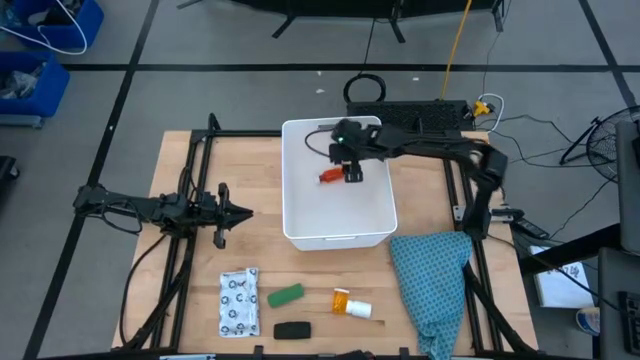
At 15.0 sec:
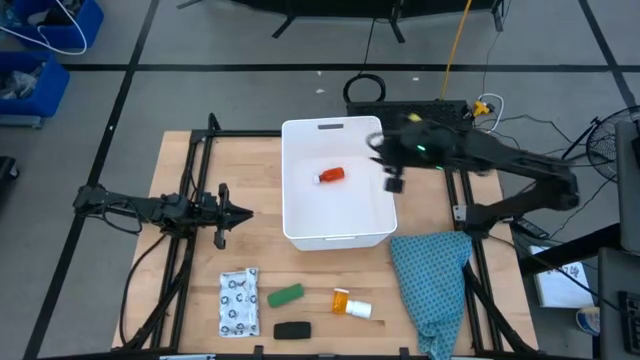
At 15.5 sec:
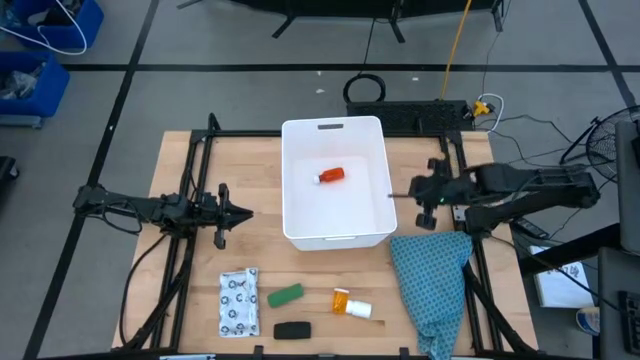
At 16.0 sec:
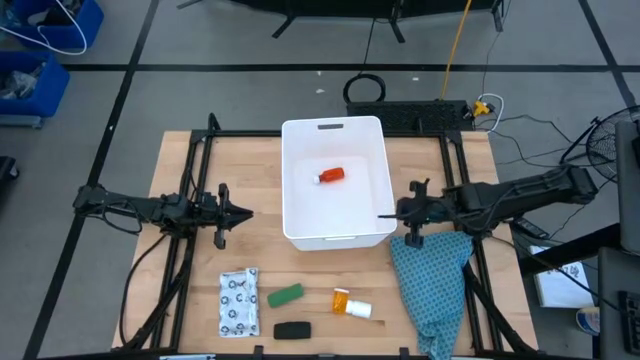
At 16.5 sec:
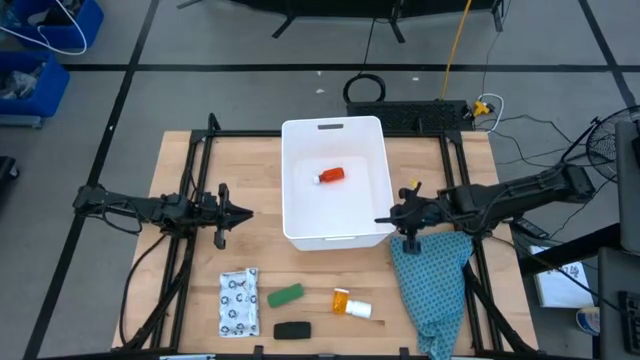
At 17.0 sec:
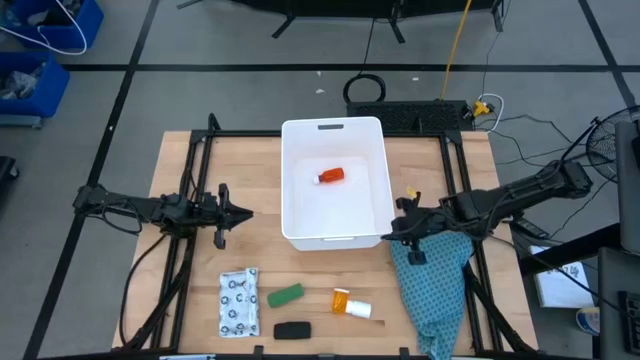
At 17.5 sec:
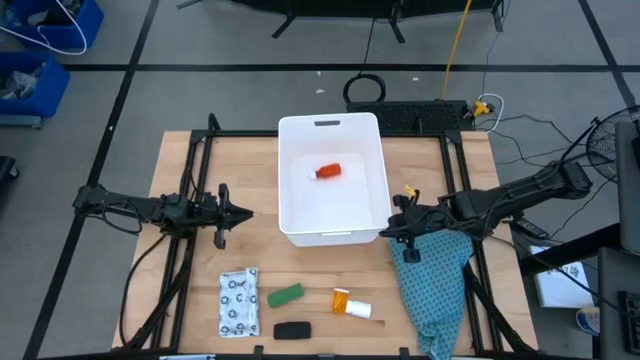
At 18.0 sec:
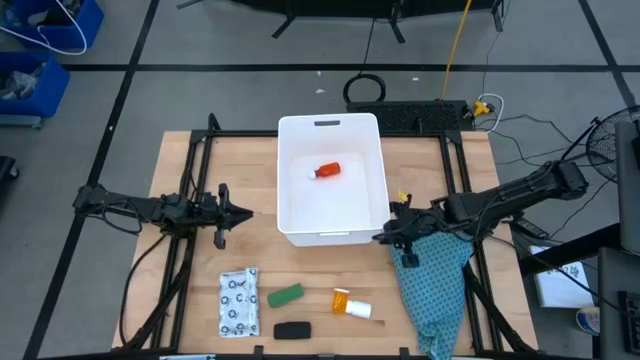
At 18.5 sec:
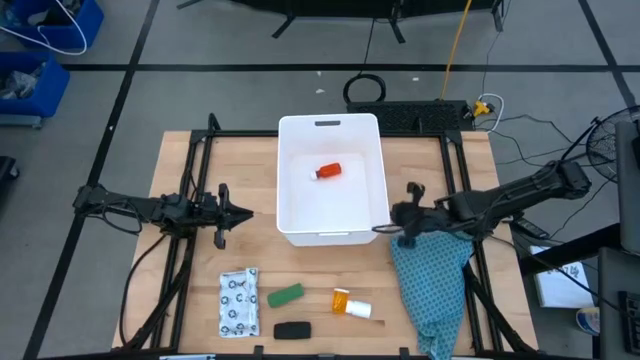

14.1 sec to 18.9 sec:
Task: Pick & place medical supplies in basket/bin
Adjust the basket

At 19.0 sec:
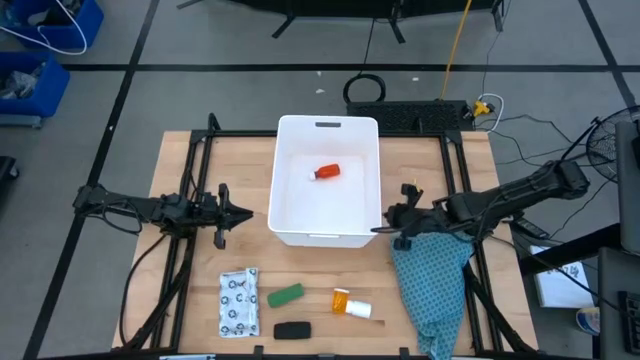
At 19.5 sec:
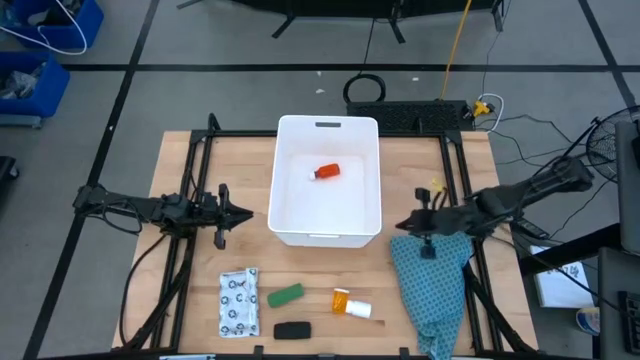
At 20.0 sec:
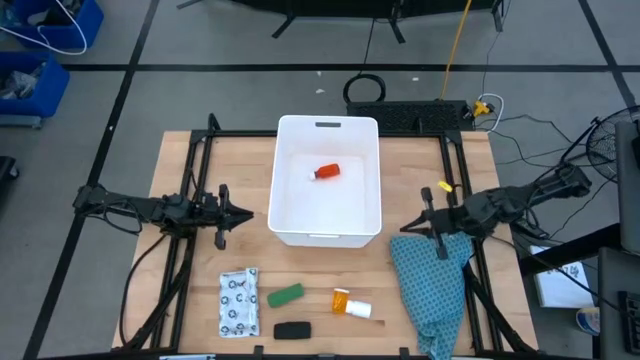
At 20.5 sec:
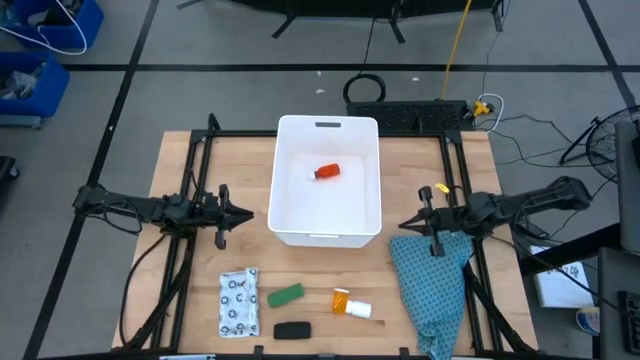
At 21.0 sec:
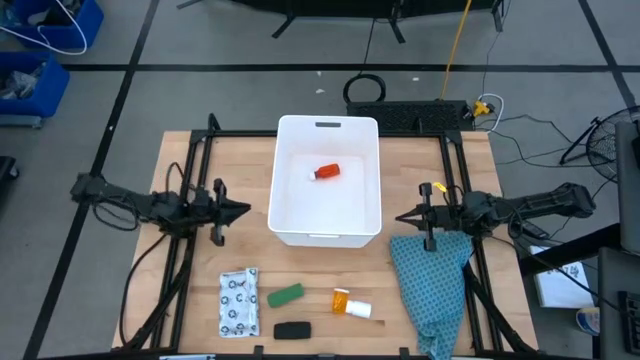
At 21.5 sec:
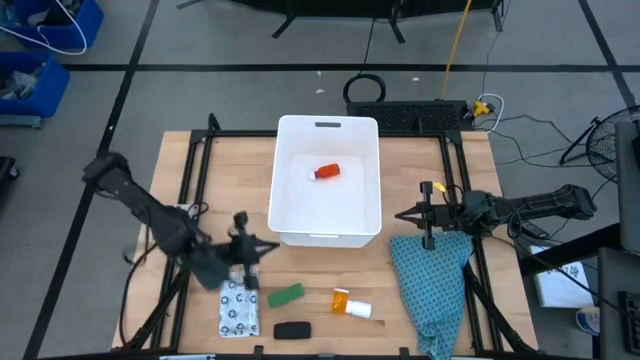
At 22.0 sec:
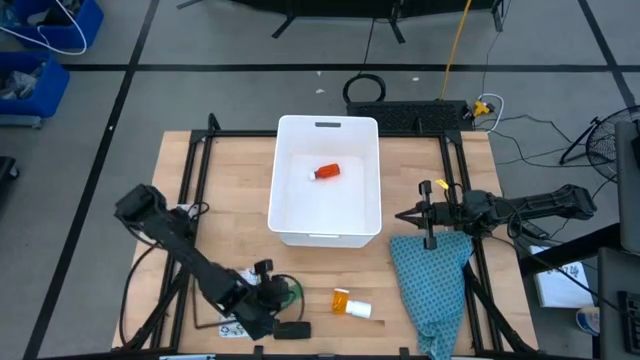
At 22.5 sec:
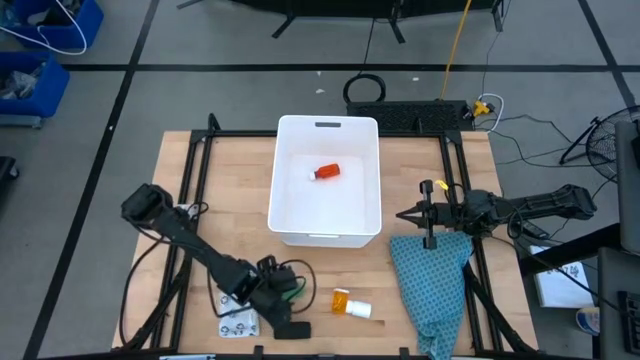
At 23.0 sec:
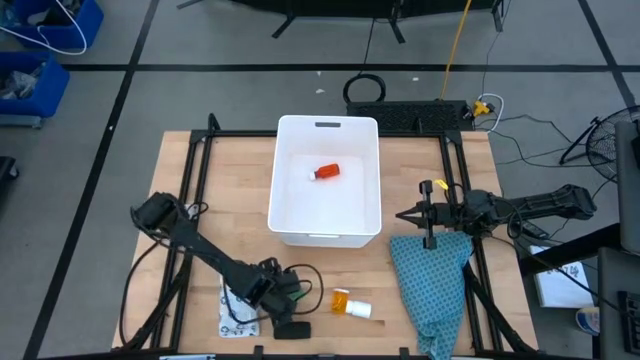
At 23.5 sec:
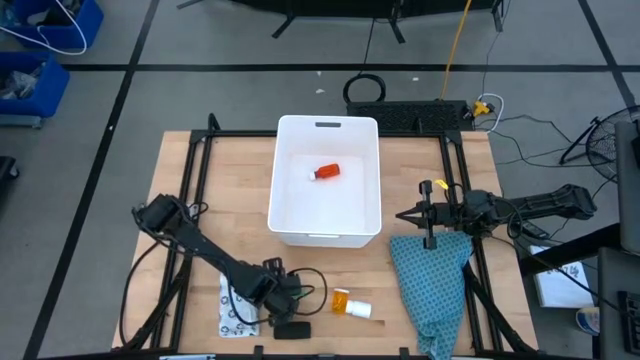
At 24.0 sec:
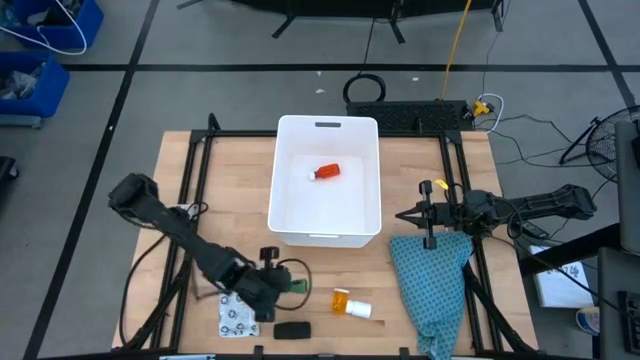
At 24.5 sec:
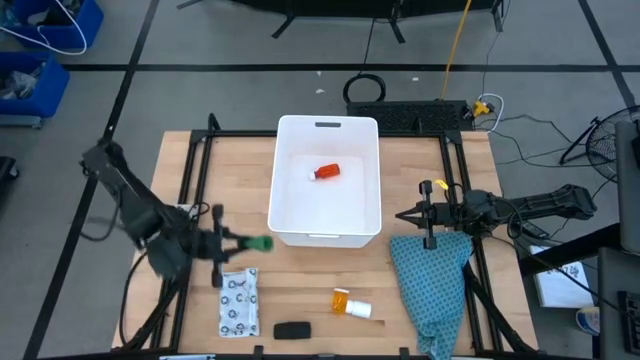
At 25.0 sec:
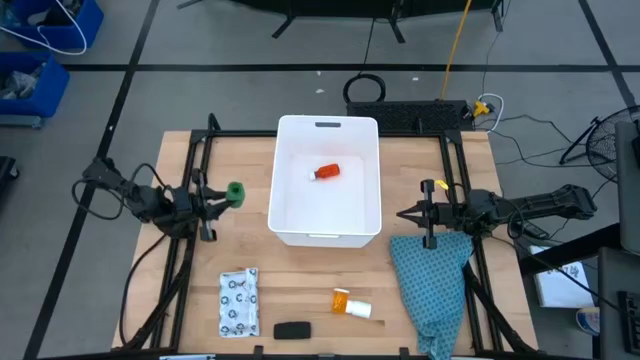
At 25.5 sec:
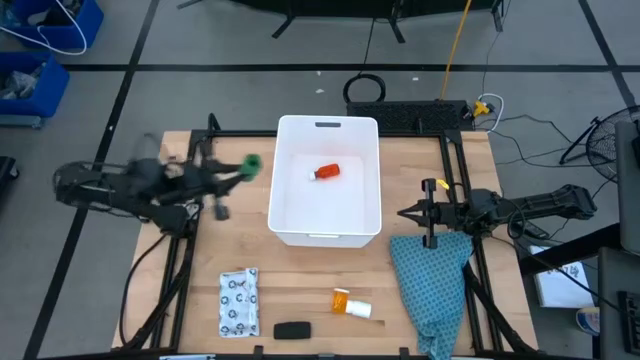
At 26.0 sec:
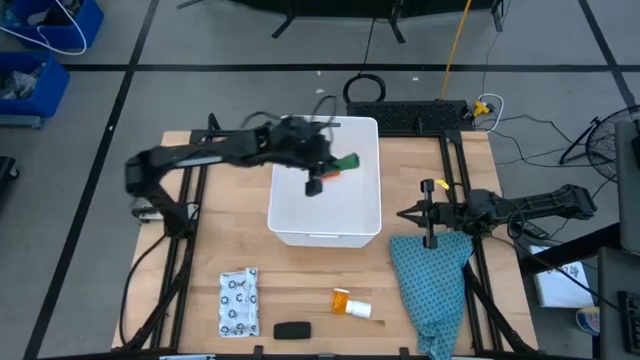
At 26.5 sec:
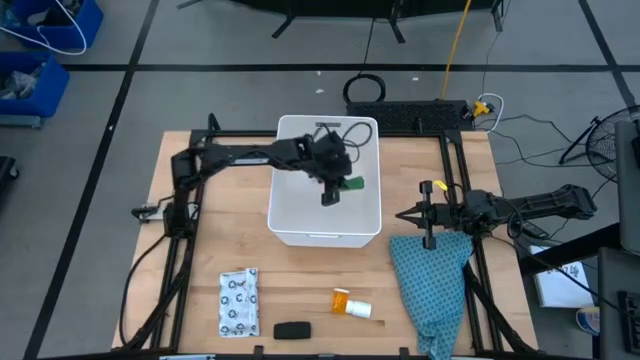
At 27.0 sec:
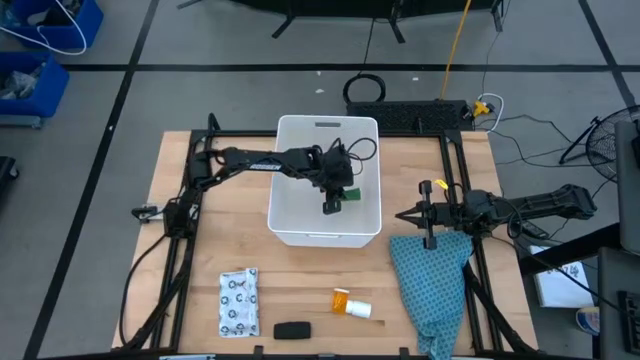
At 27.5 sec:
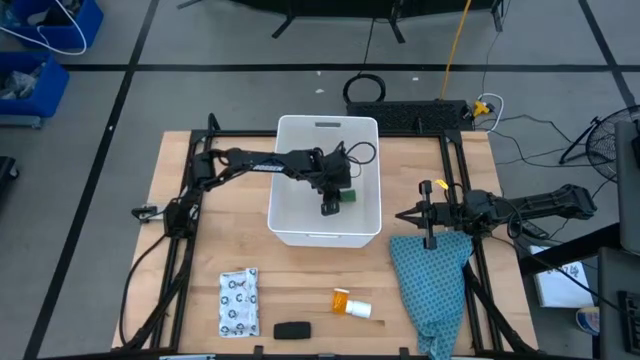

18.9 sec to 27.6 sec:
Put the green bandage into the basket

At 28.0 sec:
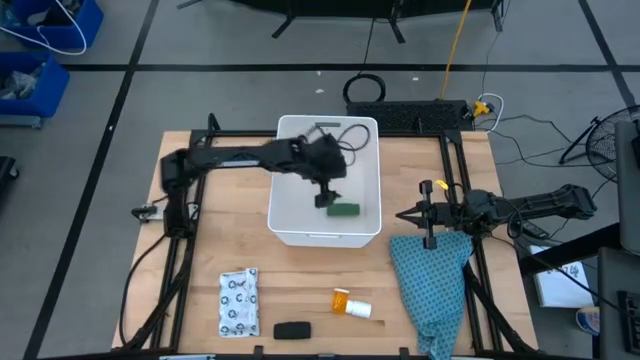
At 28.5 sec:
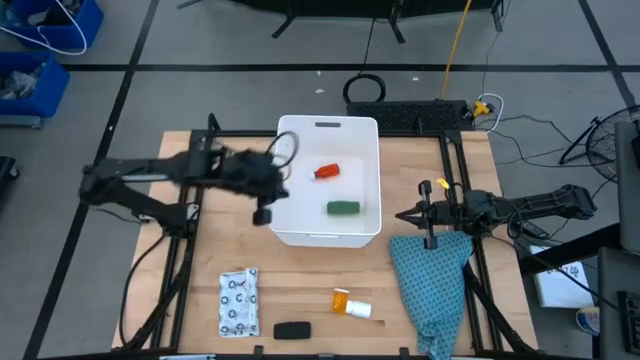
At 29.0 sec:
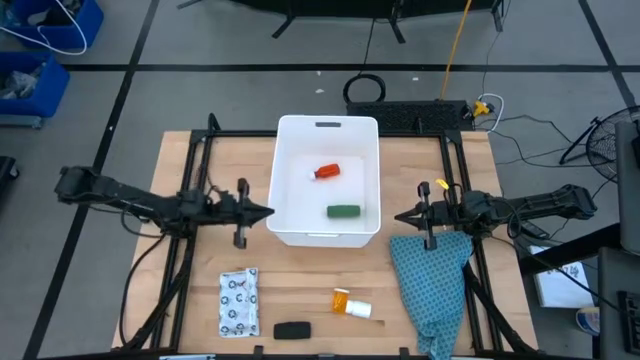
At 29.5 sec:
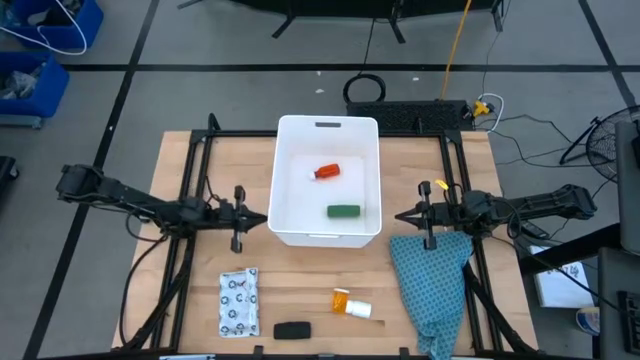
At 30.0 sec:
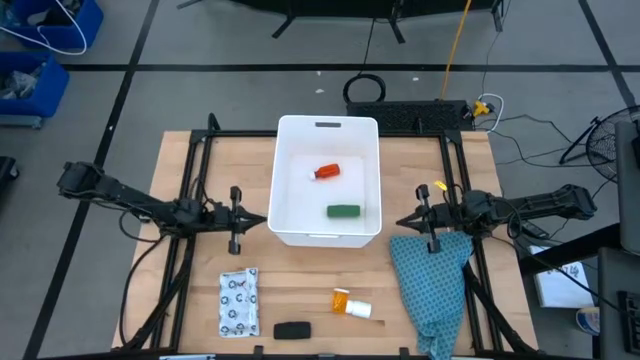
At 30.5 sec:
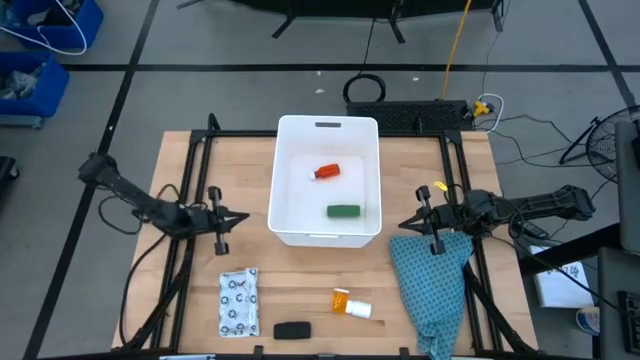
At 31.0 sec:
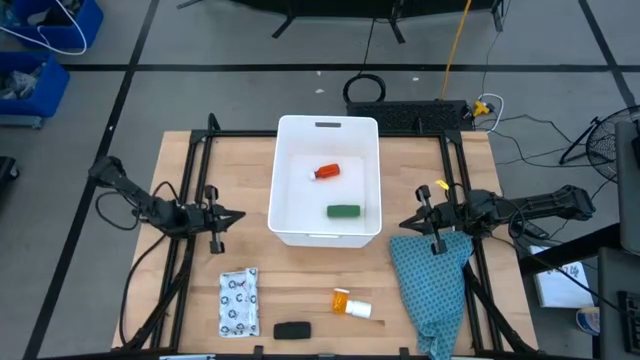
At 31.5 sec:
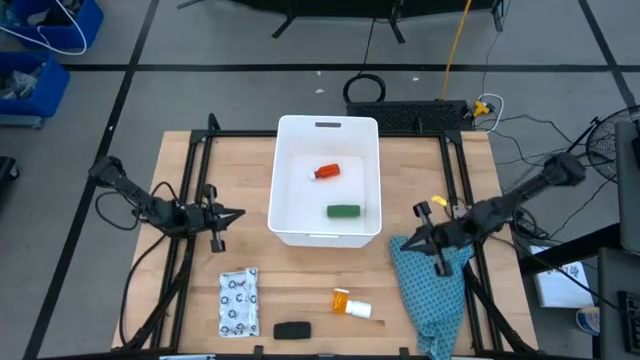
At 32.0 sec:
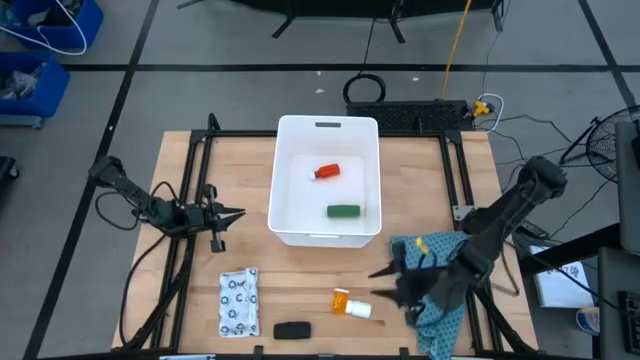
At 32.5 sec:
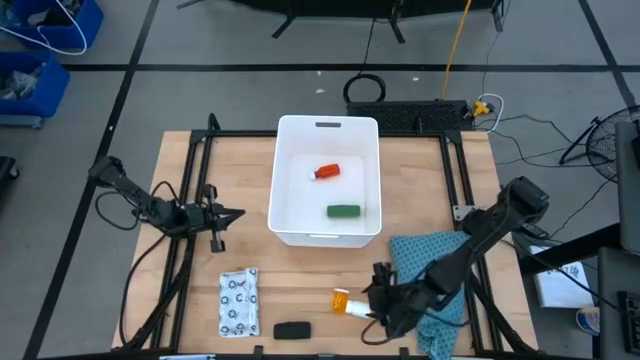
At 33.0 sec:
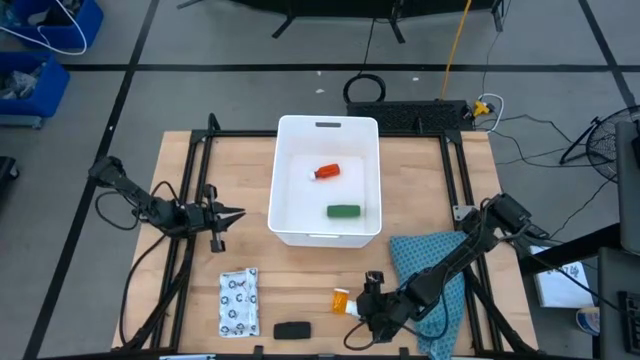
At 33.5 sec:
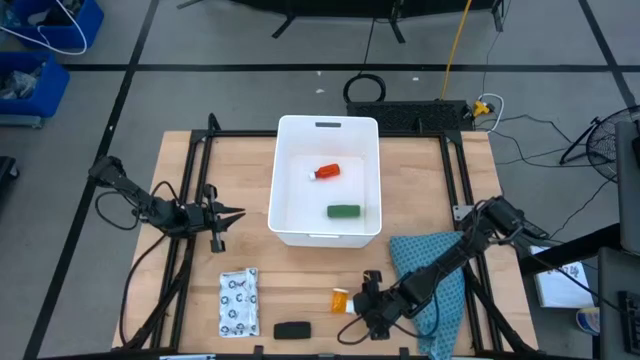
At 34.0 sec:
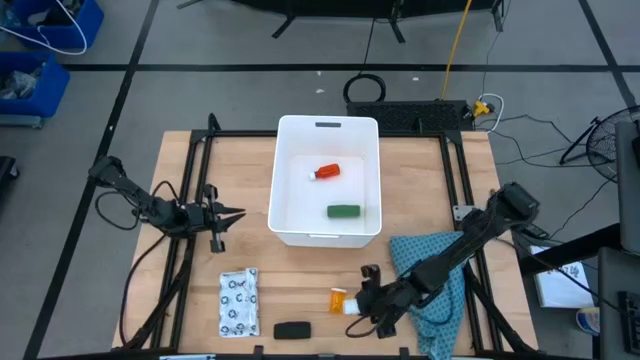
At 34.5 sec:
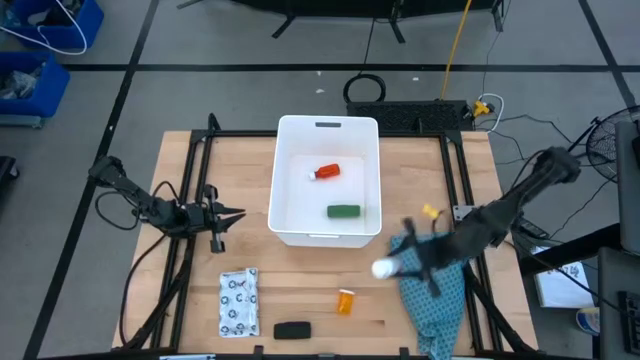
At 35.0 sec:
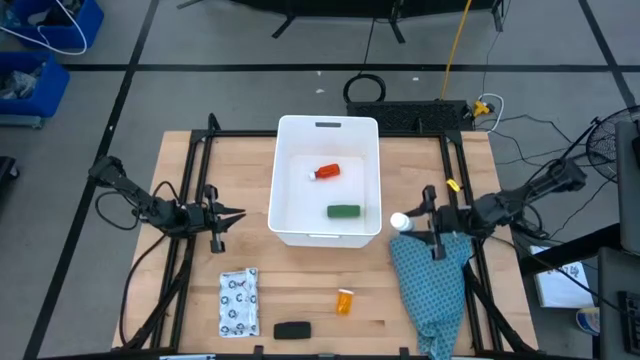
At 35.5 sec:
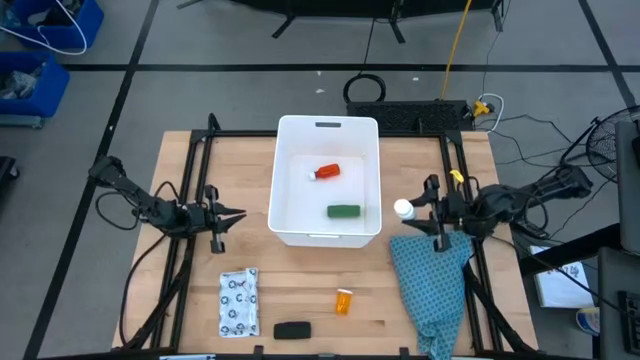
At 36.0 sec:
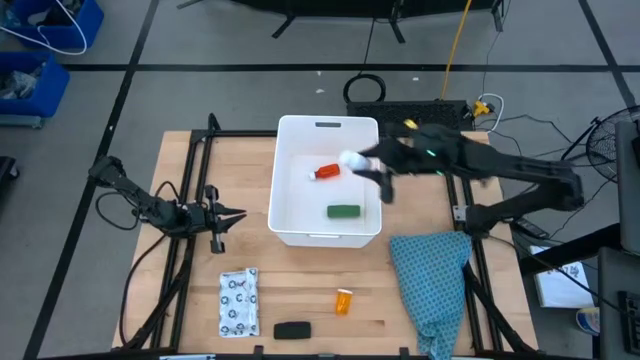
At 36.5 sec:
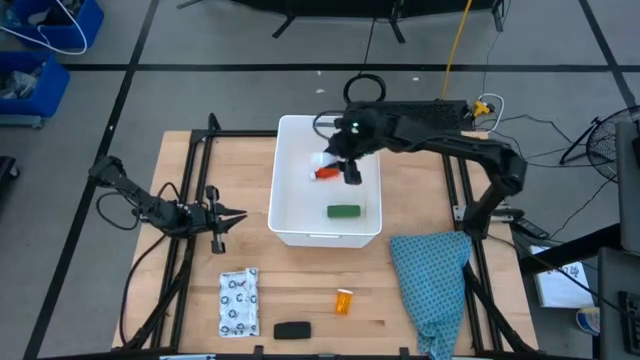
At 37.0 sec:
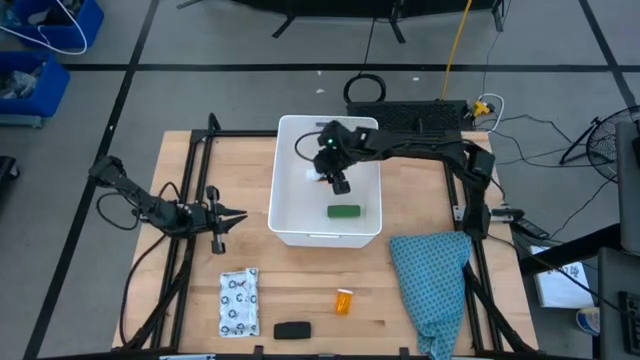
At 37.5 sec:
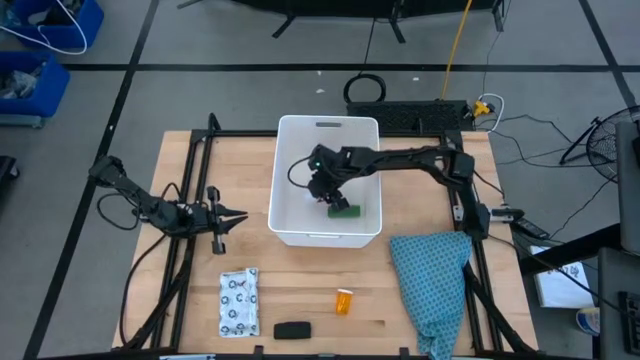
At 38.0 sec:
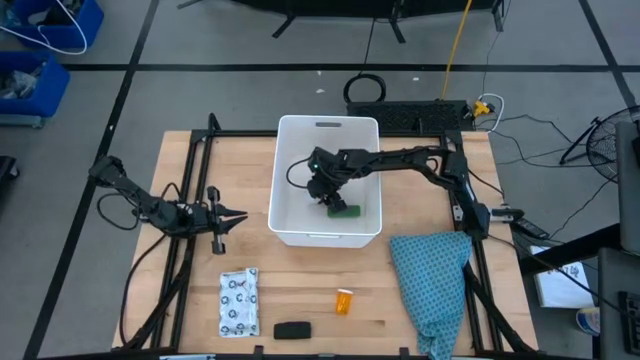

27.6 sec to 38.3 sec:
Put the white medicine bottle into the basket
